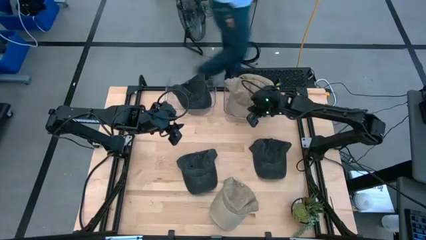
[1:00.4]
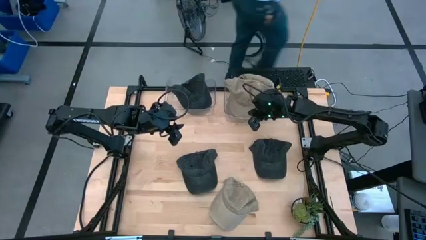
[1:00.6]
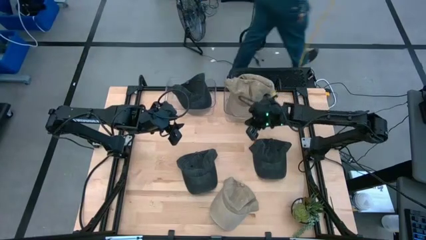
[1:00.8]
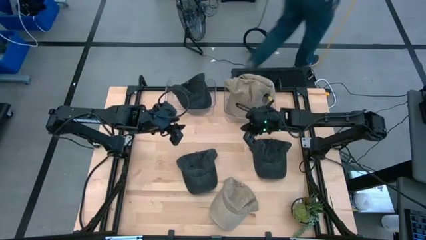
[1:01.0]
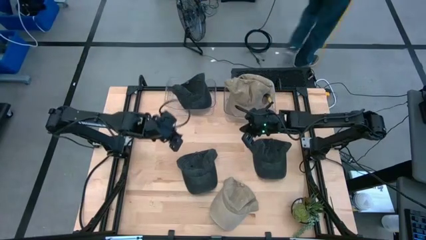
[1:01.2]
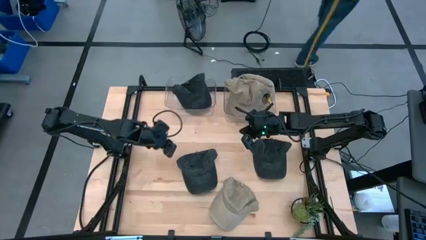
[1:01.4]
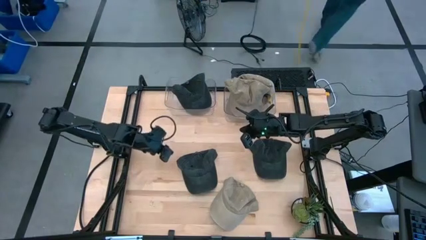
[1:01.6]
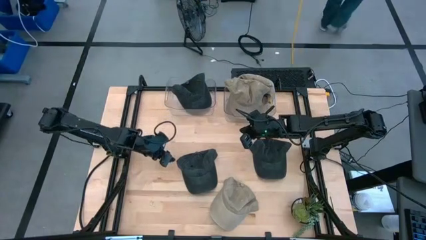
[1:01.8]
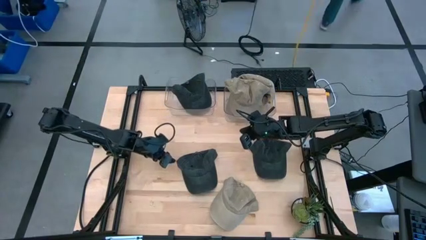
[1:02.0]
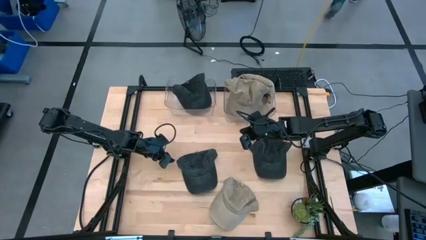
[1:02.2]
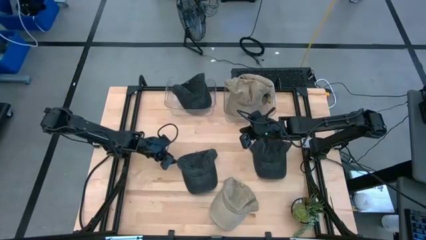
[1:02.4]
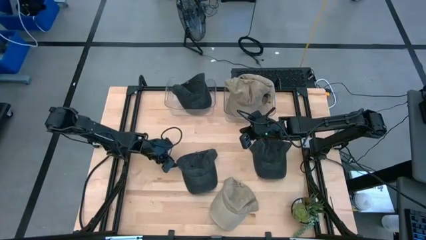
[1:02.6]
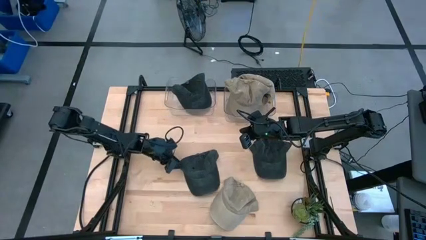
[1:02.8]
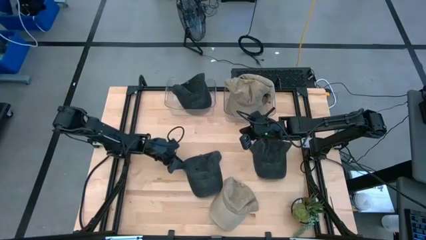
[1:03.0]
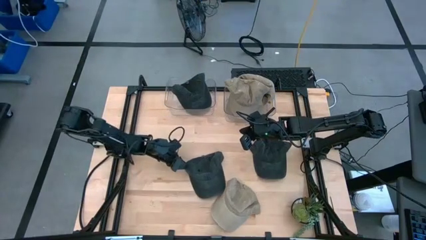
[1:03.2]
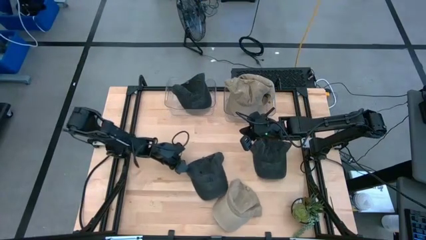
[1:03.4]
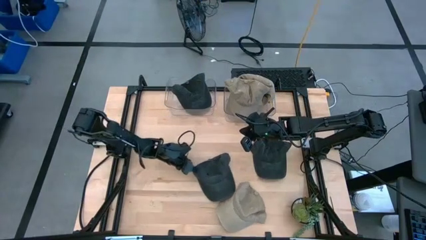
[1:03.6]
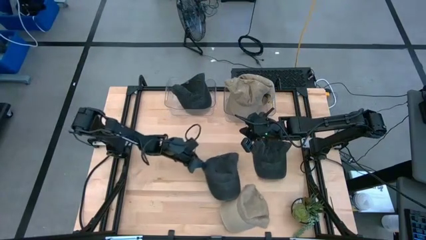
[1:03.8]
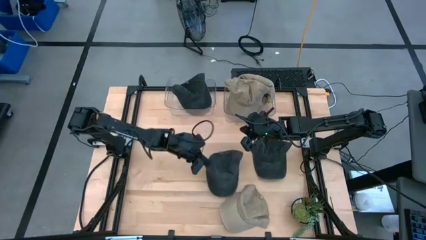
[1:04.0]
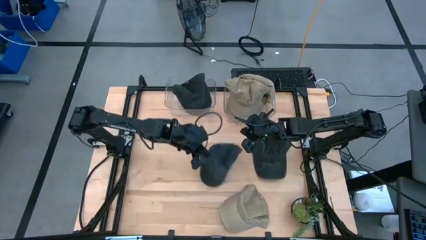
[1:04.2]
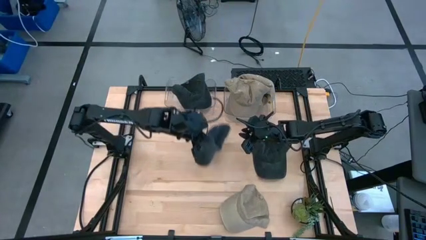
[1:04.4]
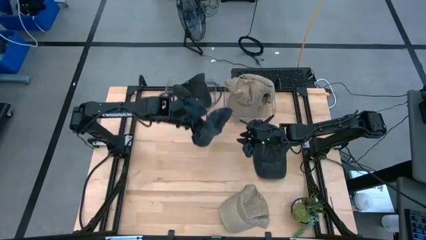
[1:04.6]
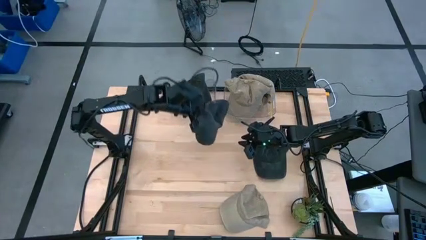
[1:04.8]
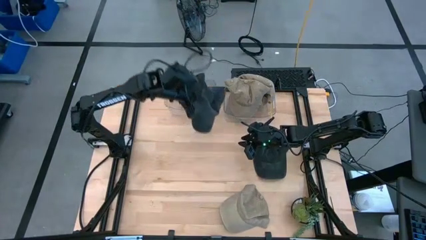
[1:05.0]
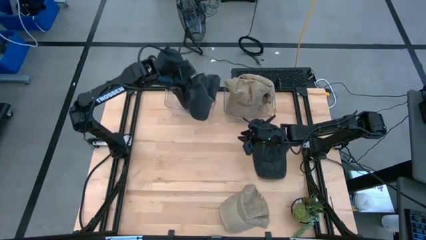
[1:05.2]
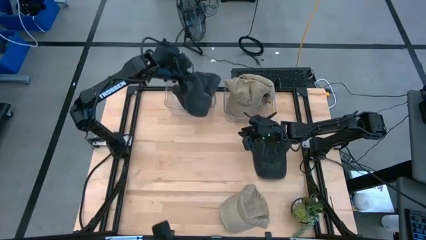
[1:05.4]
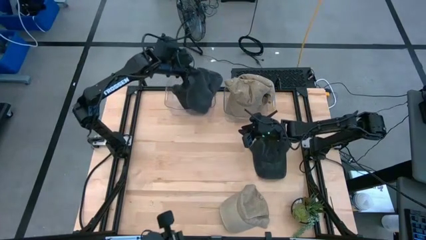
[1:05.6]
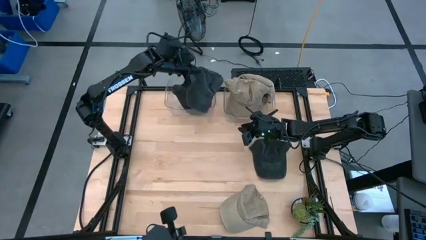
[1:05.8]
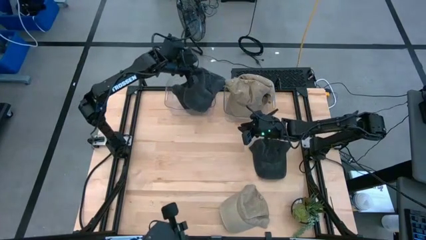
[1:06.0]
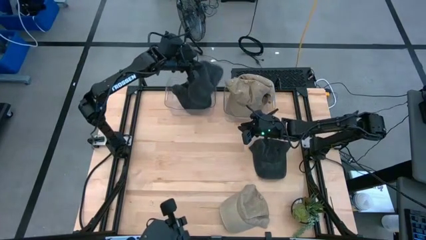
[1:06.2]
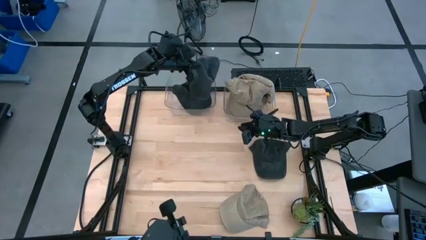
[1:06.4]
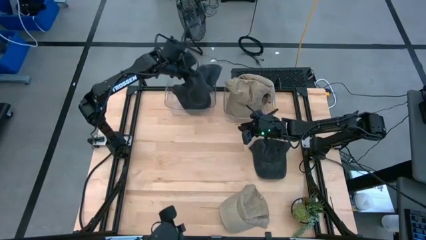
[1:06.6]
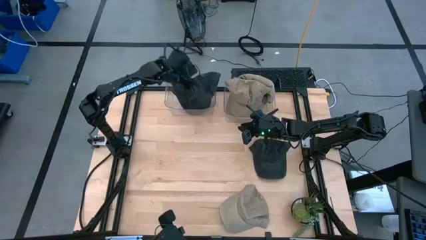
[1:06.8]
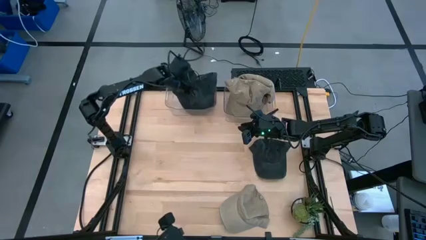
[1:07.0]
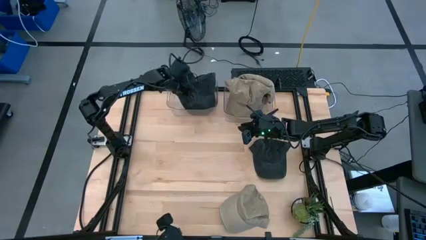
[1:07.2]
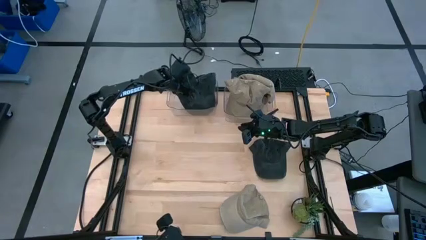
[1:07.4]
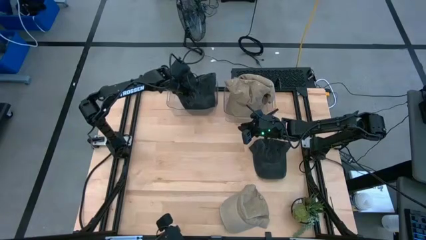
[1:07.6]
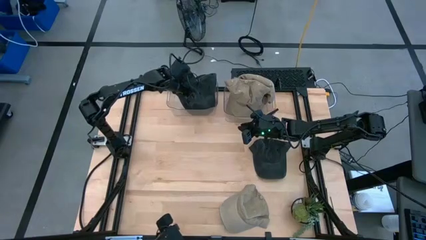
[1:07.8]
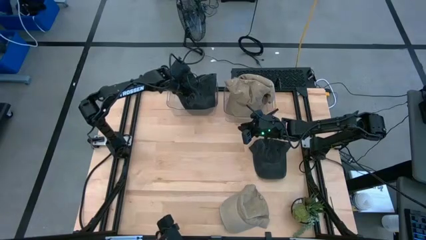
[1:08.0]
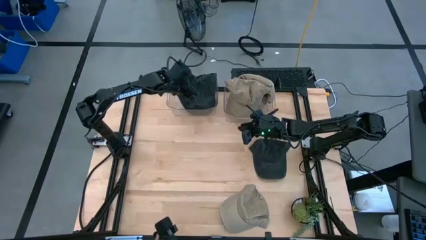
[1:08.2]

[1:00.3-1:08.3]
Task: Pick & Place hat
Put the black cap into the left transparent bin

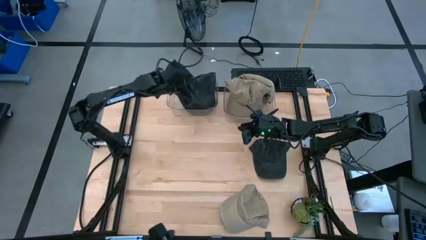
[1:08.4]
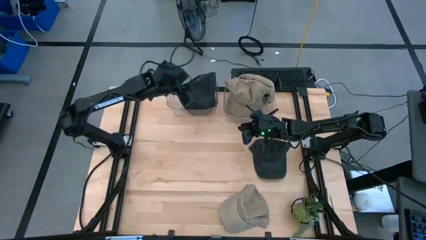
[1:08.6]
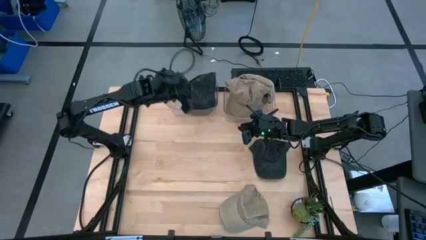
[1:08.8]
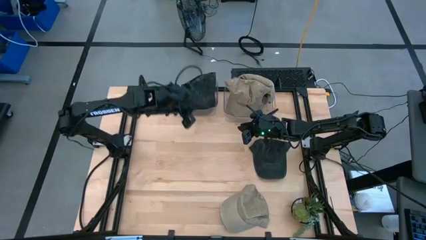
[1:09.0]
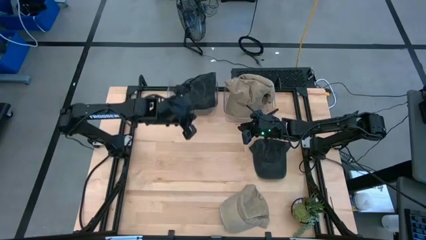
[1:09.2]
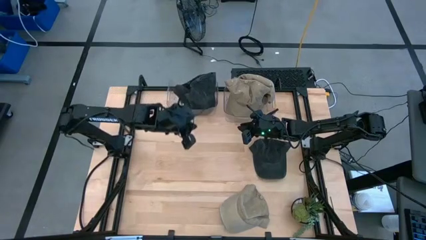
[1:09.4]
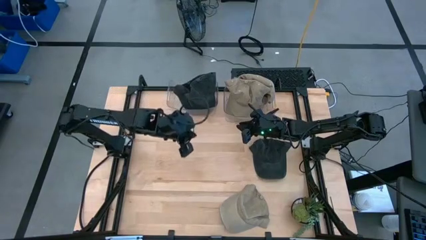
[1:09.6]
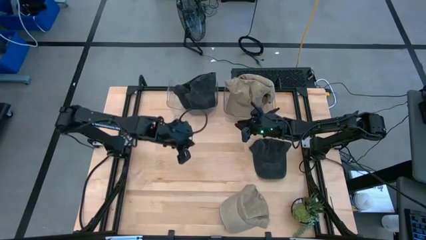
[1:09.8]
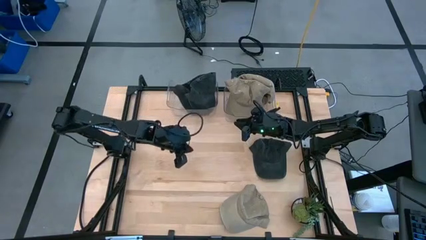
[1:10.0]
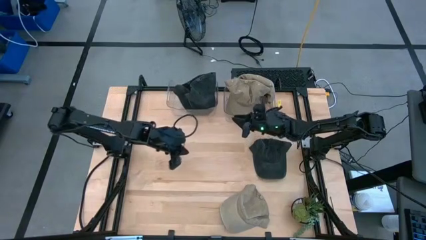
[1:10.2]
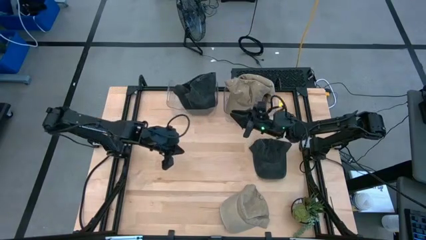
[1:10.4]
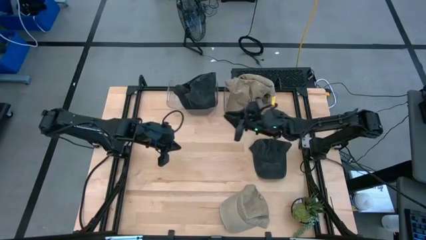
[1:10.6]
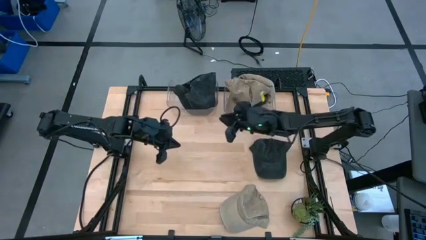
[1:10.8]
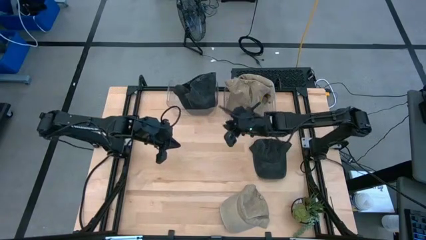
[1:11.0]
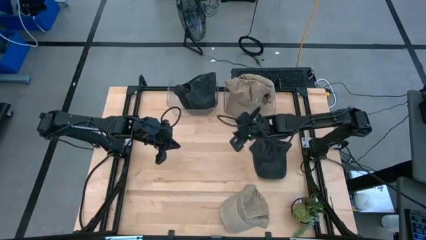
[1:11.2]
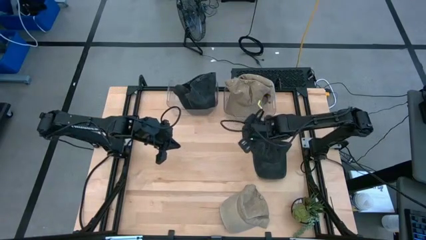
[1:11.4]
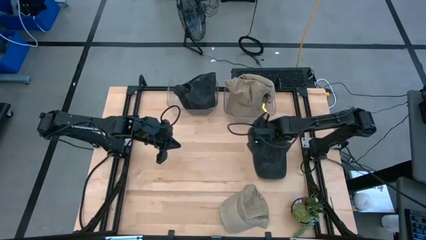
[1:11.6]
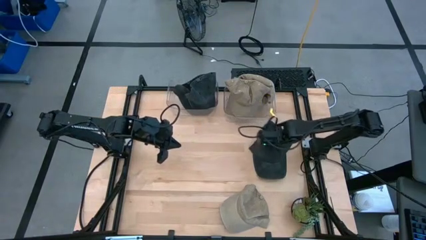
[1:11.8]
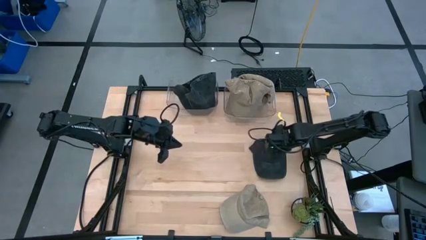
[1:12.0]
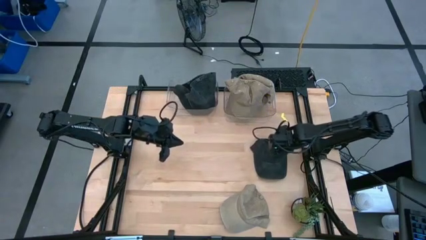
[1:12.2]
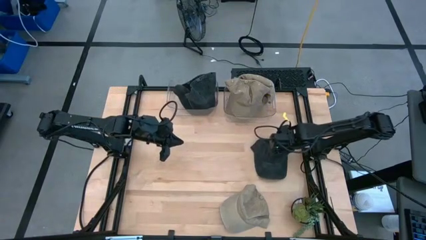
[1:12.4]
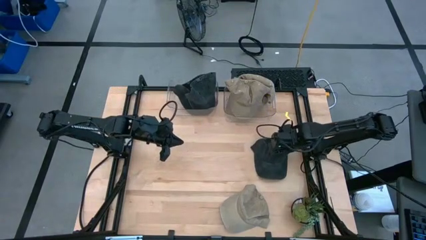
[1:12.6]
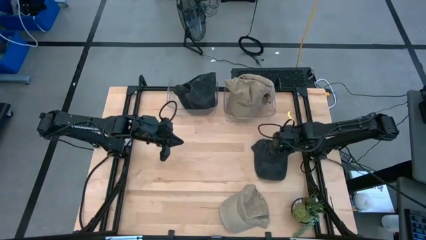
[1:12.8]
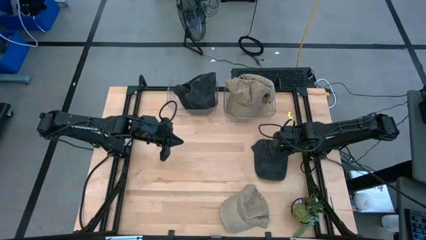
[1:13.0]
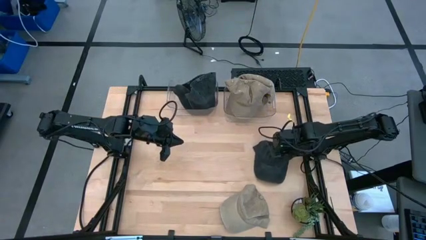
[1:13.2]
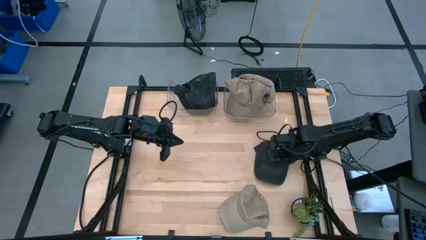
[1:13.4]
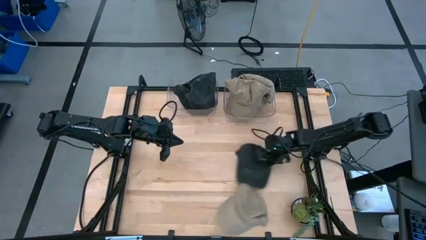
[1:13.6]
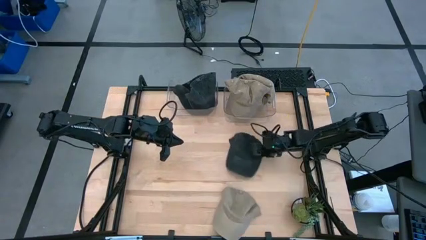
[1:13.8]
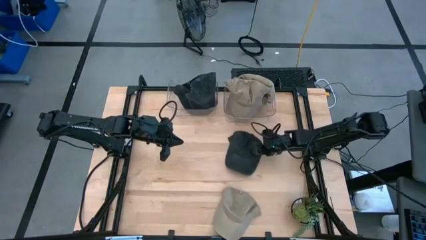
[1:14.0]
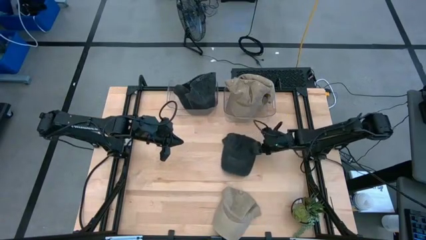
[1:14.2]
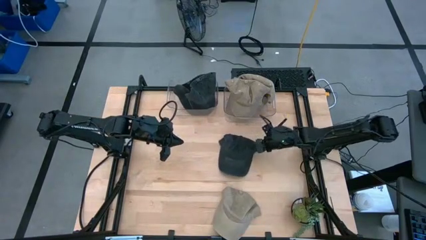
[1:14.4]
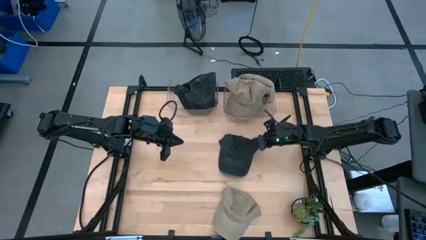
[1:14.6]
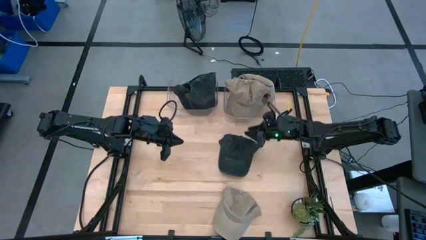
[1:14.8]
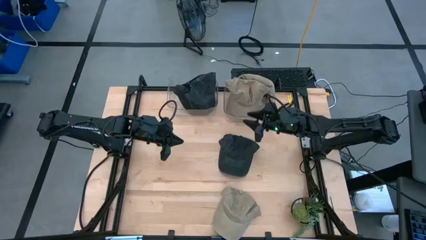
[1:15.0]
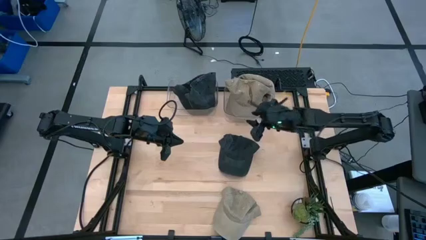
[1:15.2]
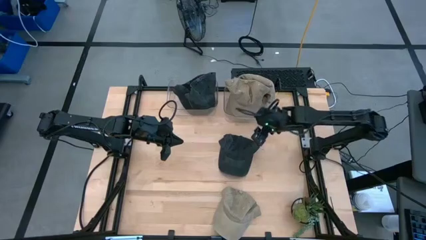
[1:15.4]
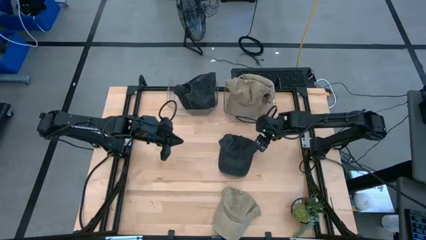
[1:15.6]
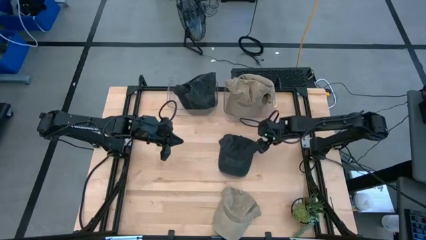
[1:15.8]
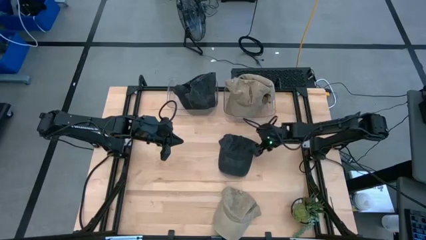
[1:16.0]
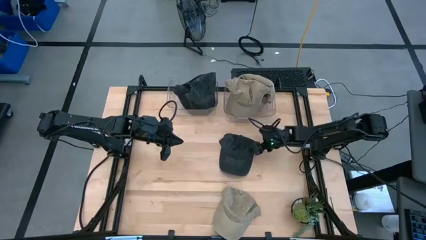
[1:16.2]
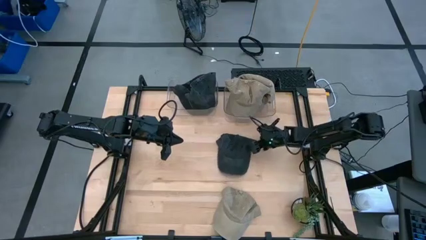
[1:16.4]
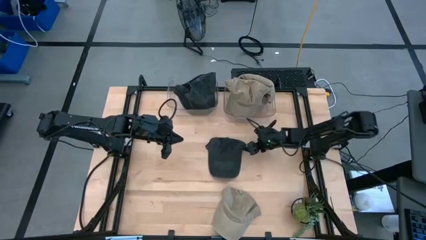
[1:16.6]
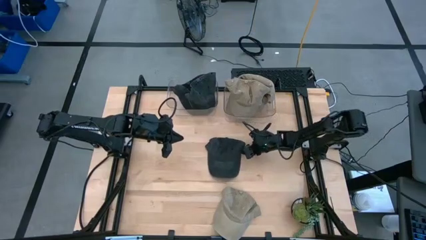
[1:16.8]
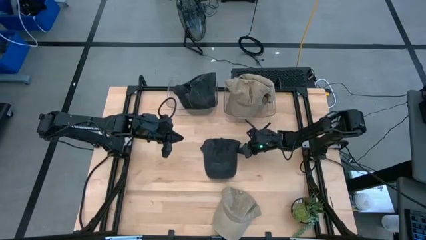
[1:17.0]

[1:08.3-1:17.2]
Put the black cap into the left transparent bin
